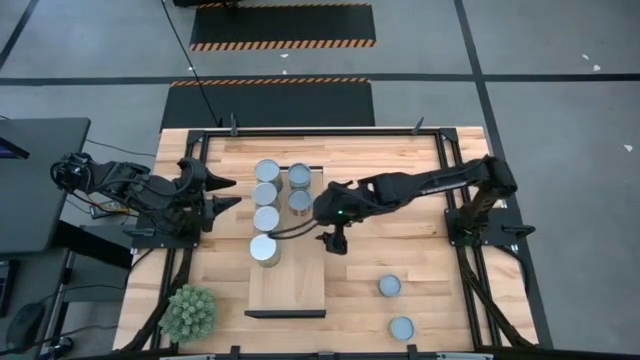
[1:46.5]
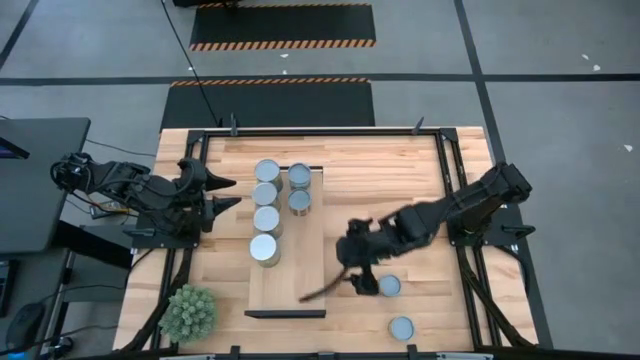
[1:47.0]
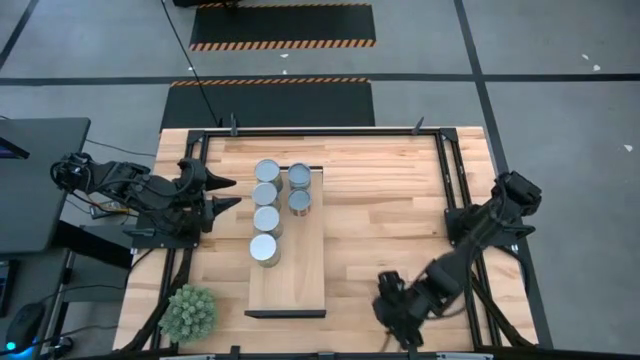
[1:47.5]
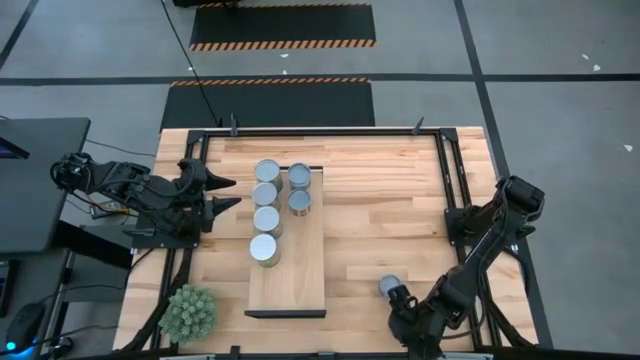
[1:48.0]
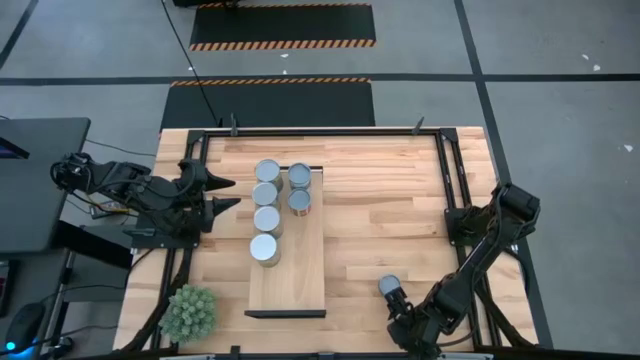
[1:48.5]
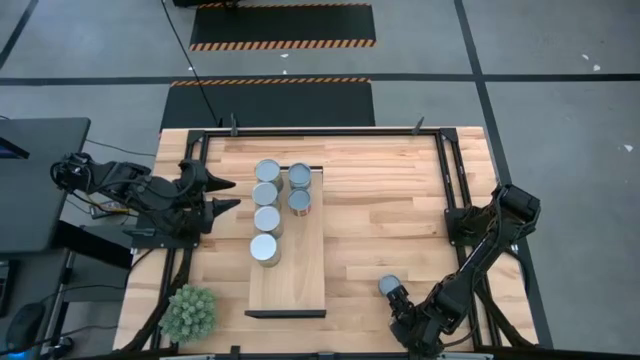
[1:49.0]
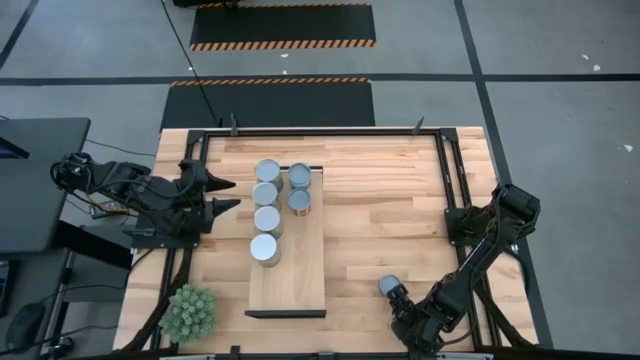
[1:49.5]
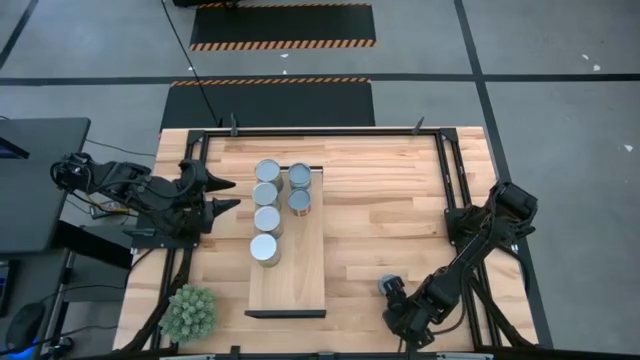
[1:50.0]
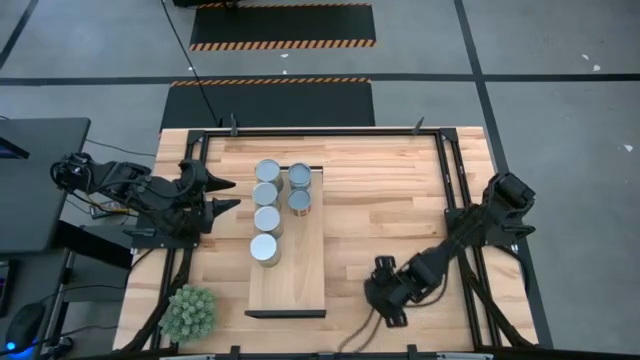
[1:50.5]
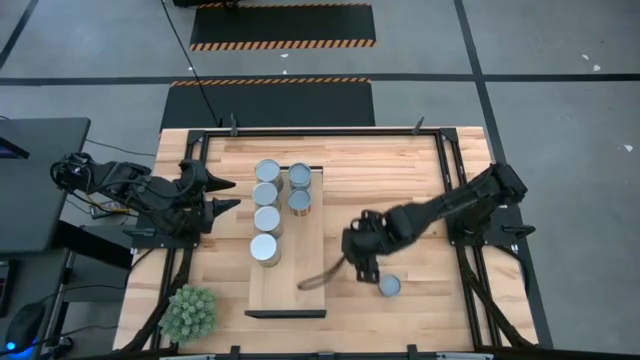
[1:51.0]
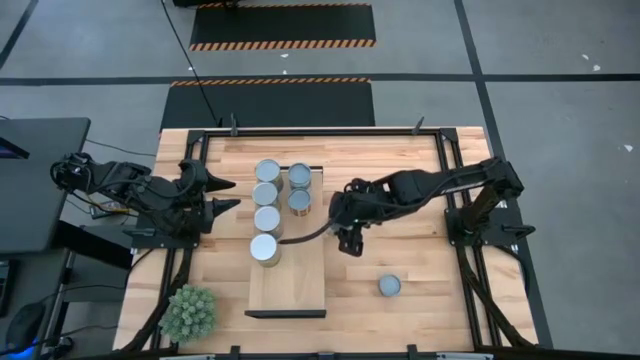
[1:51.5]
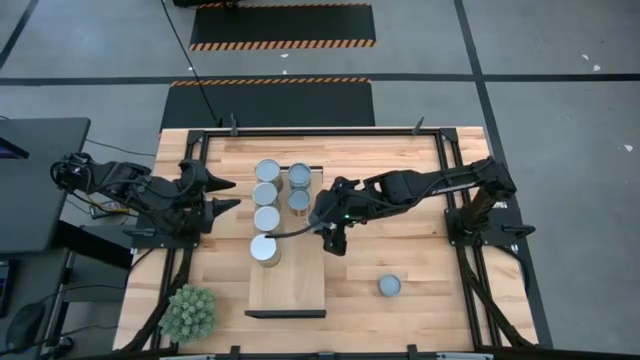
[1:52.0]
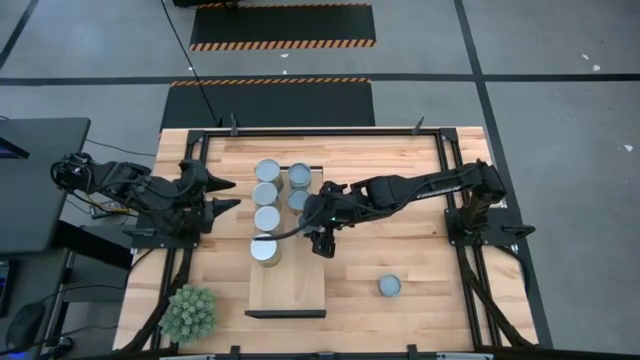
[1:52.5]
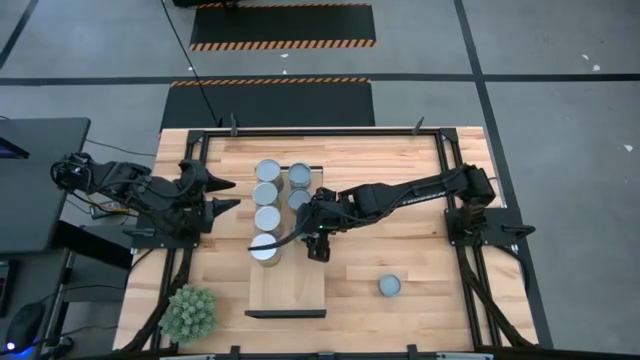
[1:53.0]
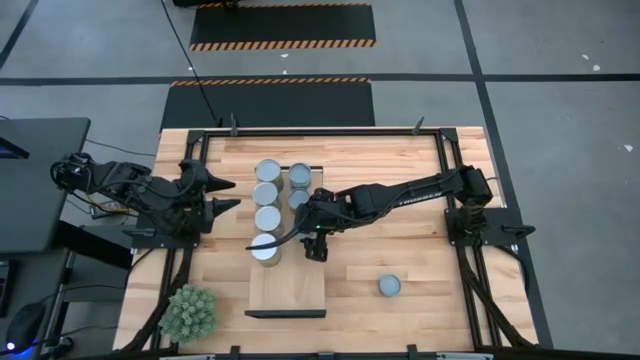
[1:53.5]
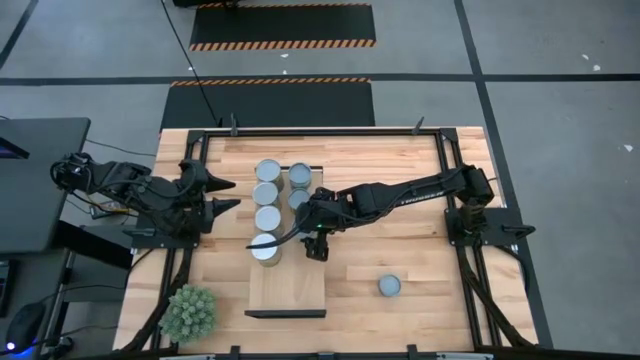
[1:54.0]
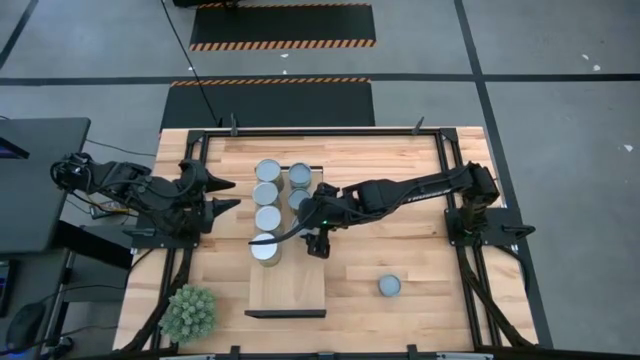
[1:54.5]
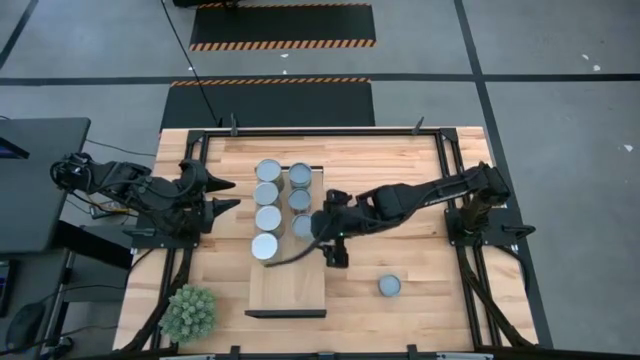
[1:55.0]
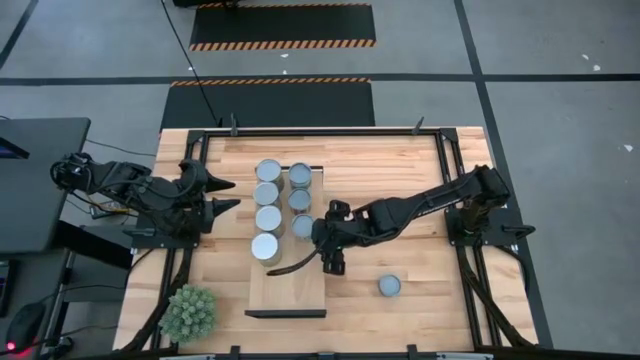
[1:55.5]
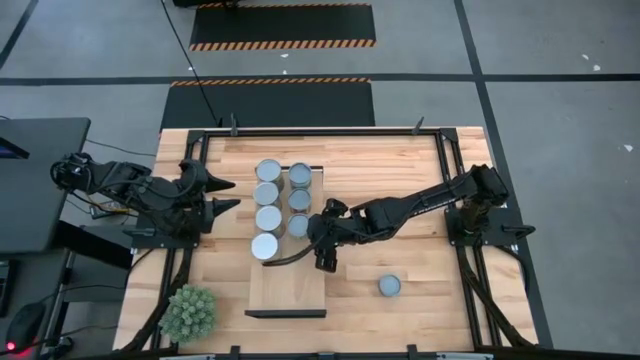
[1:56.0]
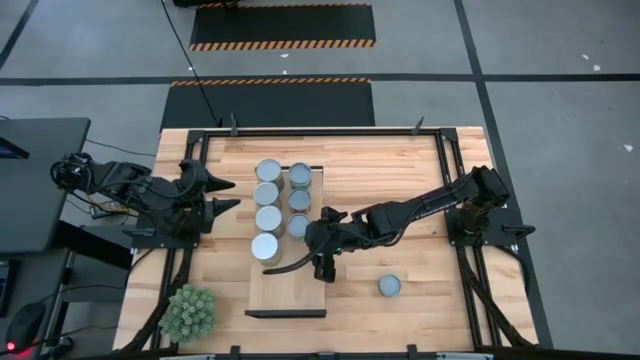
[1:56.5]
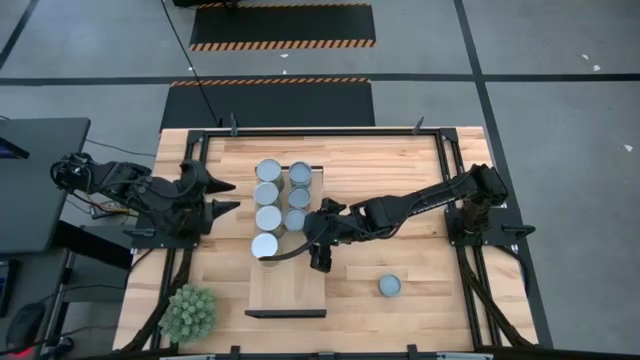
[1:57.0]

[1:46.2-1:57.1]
Task: Pick and place cans onto a shelf
Put the canned green peas on the shelf

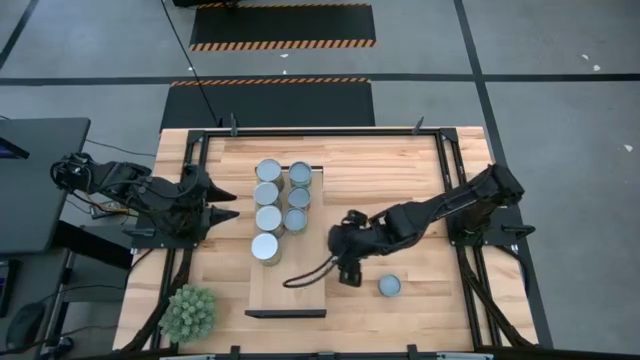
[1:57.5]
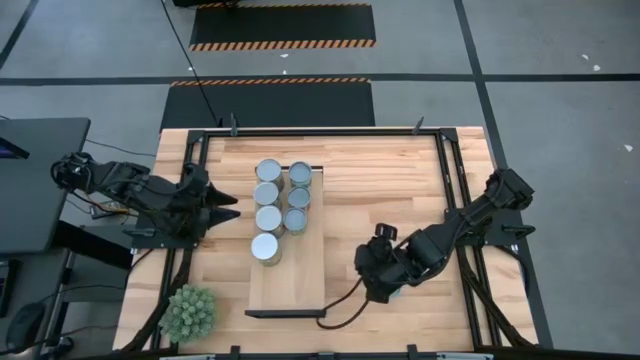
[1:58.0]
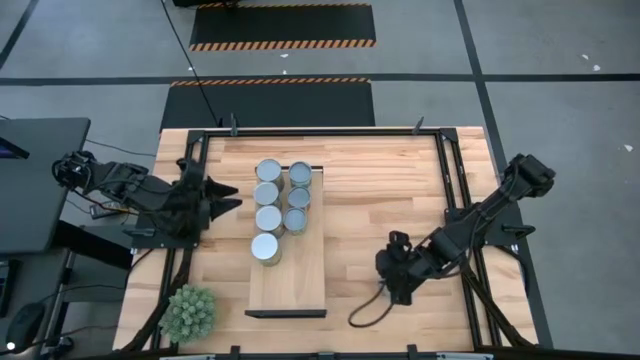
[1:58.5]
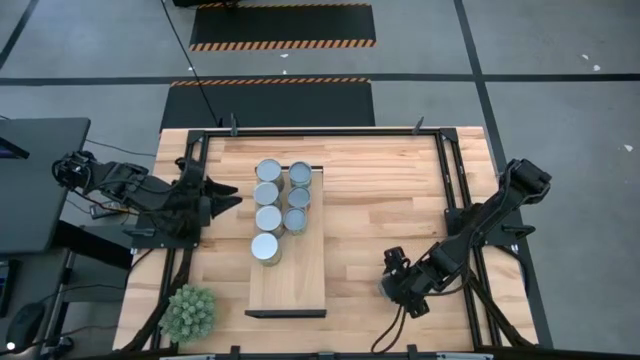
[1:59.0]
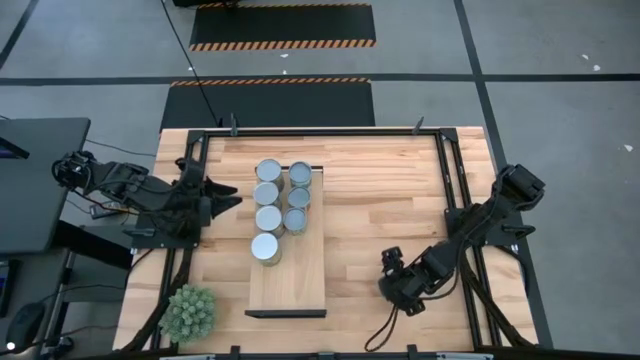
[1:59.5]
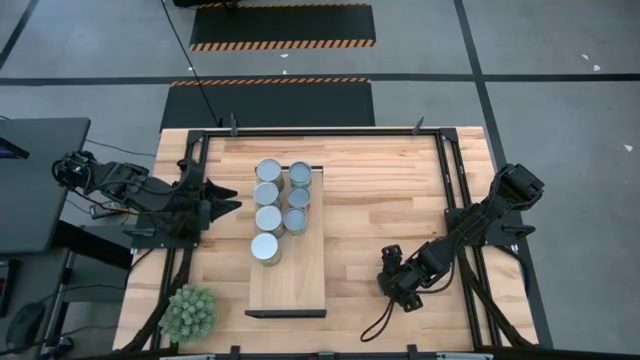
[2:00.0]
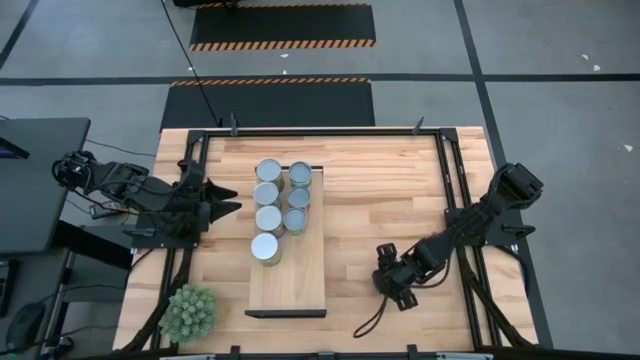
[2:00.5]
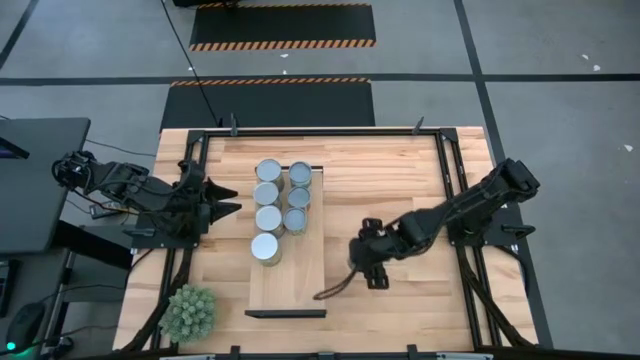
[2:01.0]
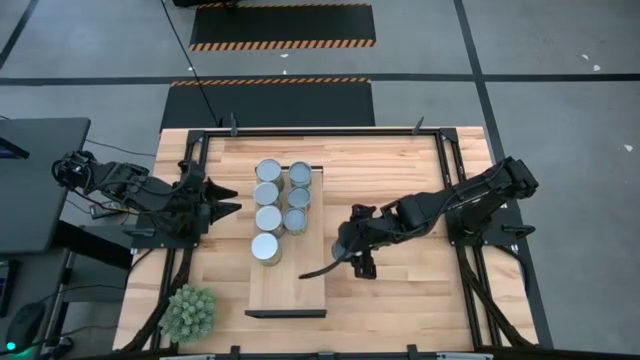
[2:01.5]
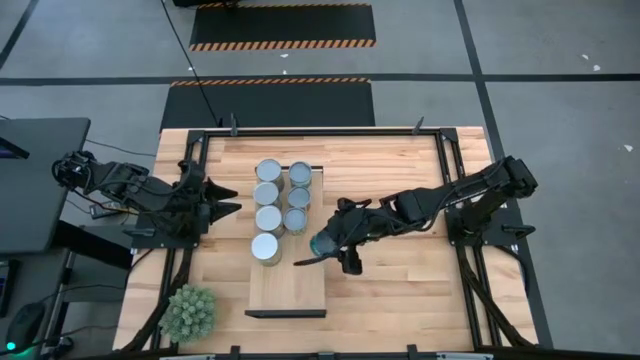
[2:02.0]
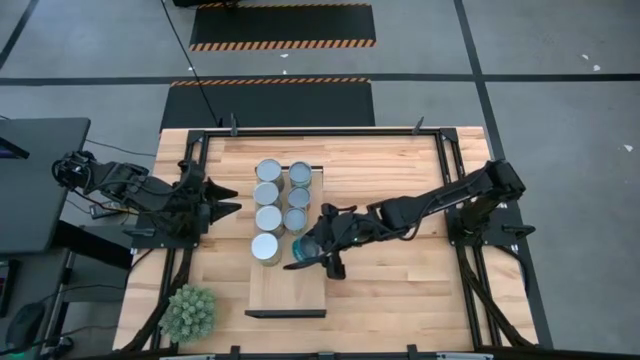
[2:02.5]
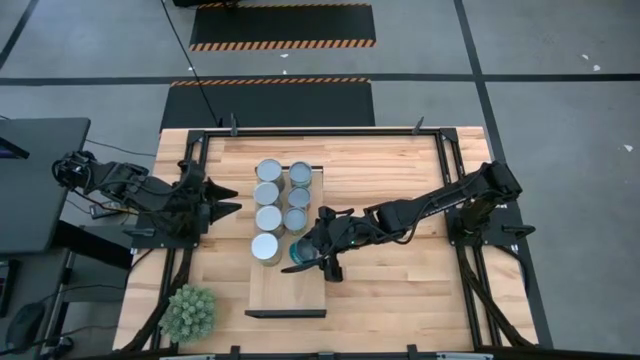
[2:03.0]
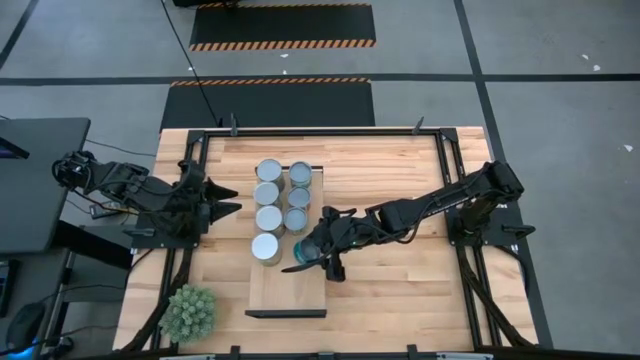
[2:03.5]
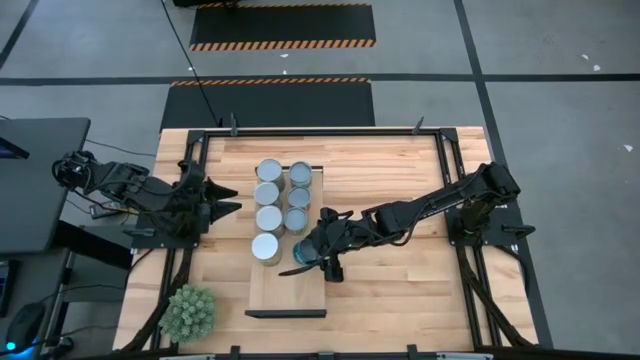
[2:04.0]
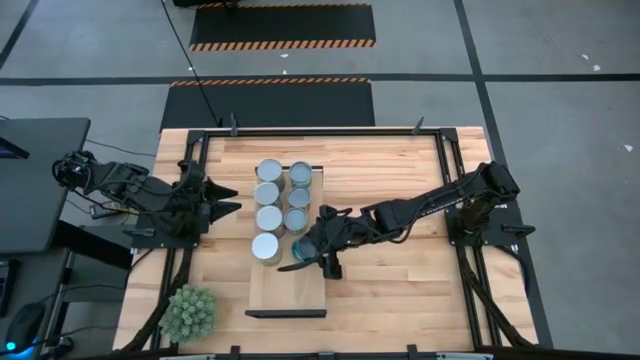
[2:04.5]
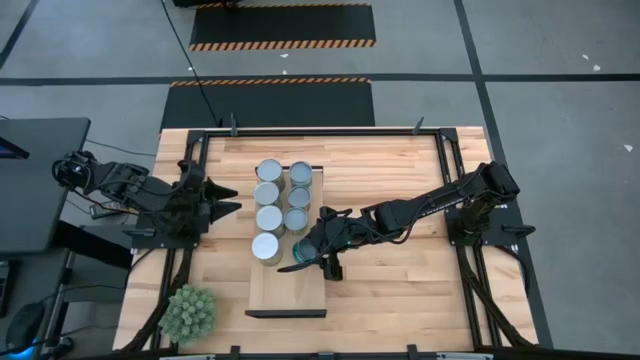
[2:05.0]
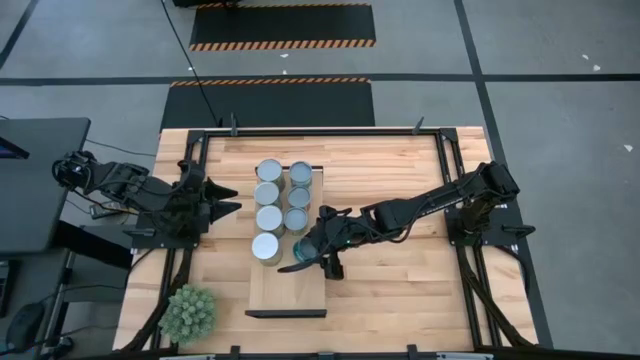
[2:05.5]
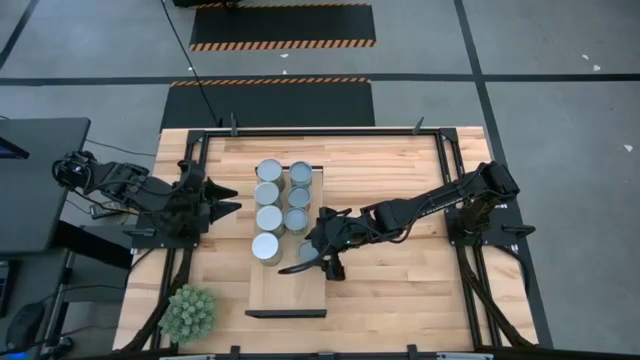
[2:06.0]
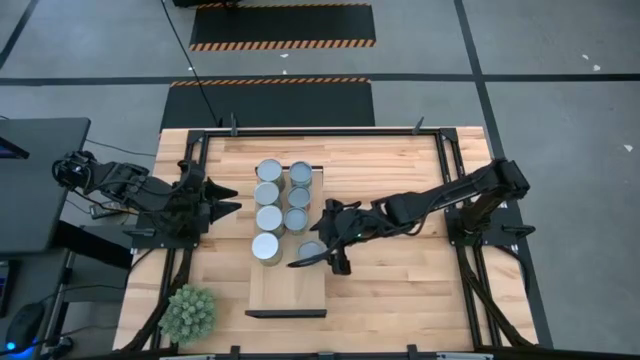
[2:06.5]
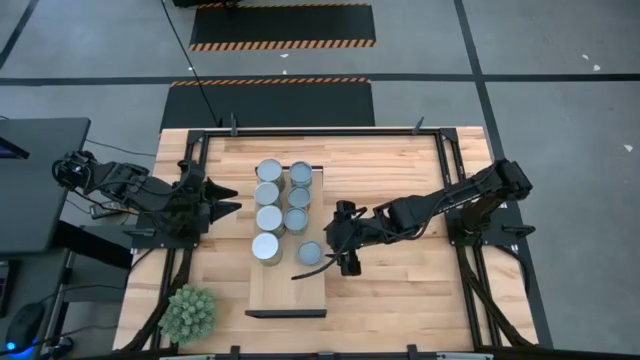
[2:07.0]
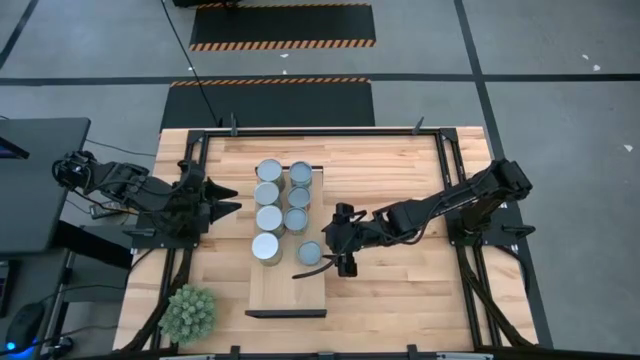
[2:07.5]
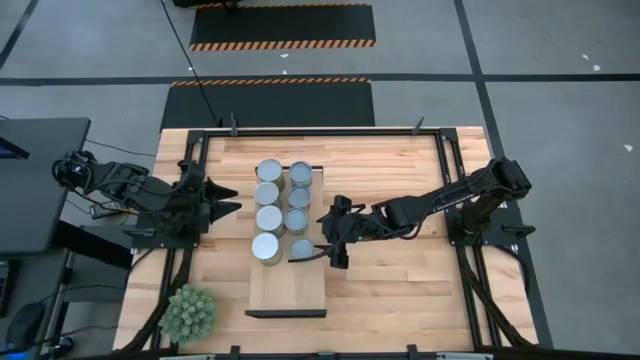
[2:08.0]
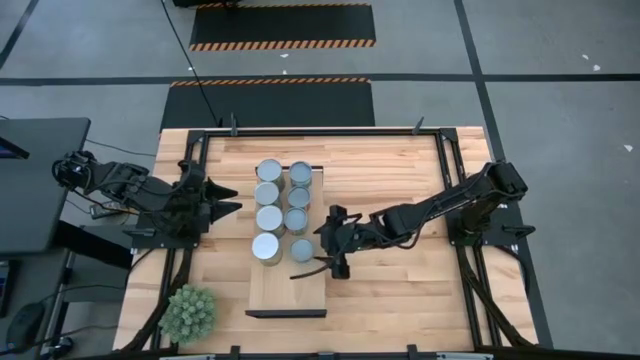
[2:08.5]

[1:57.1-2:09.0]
Put the canned tuna on the shelf
